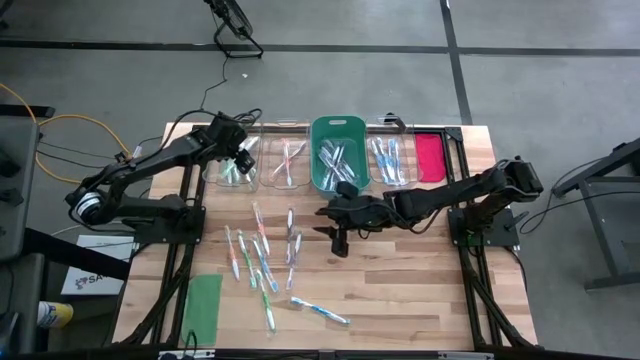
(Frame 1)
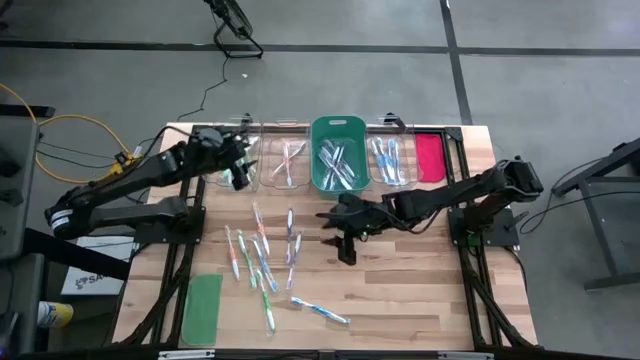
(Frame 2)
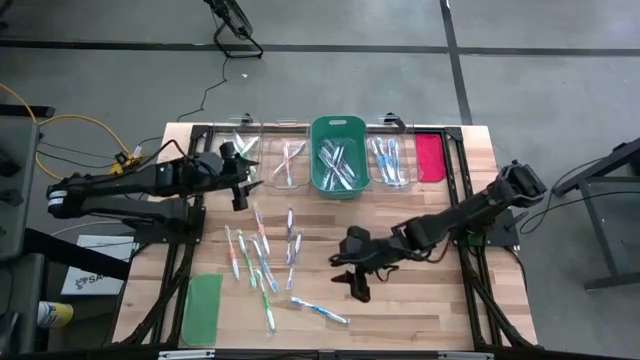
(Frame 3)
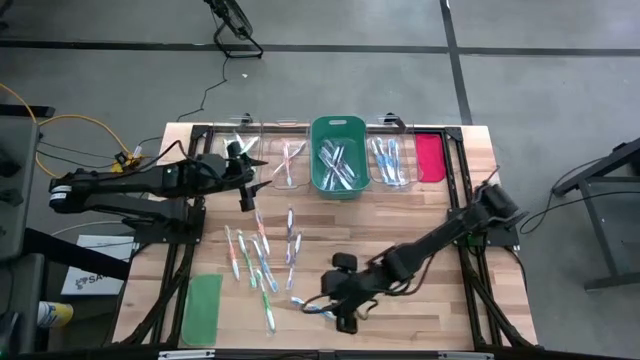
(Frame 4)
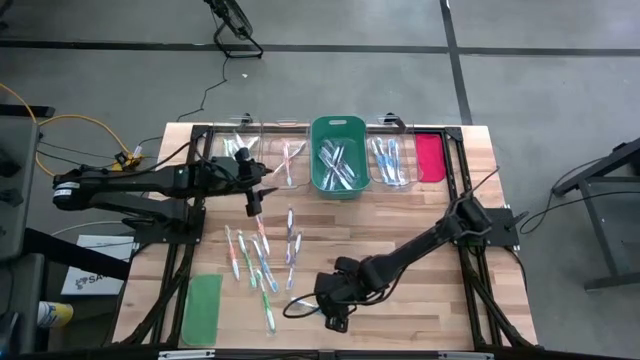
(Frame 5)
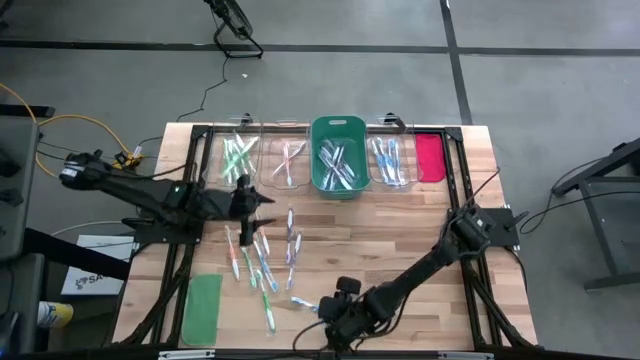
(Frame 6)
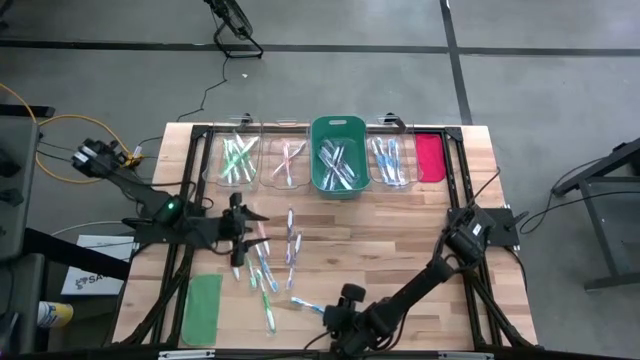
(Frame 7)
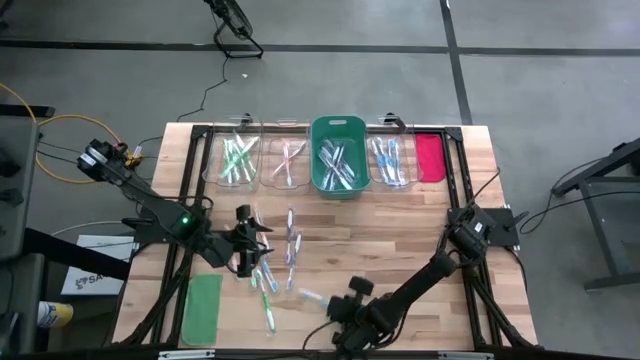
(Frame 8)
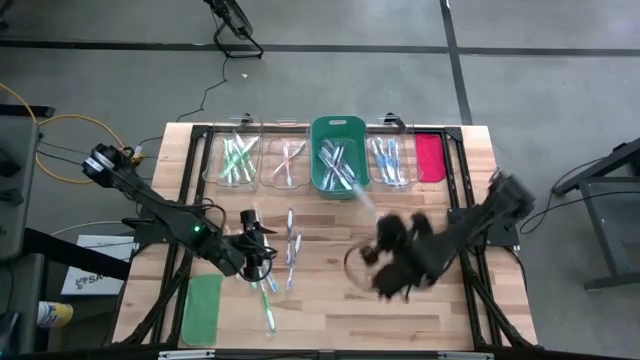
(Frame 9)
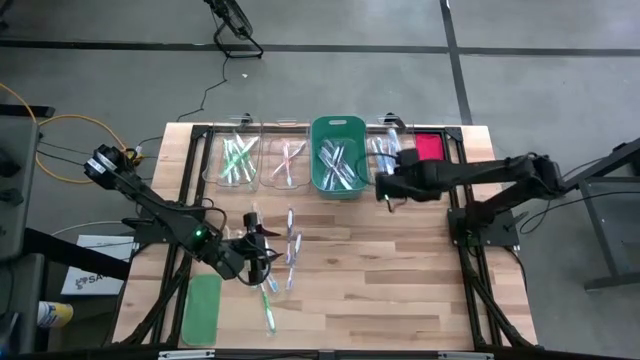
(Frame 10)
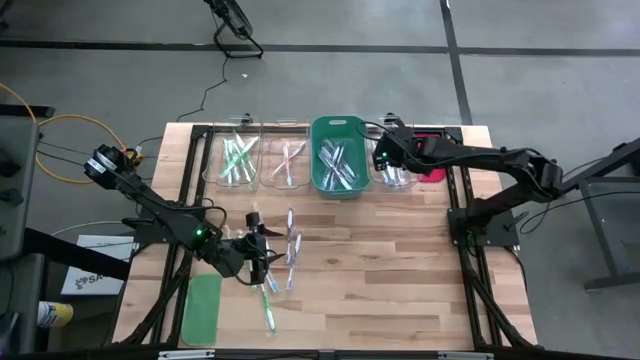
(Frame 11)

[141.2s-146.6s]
Task: Pick & Place Toothbrushes
Put the blue toothbrush into the right transparent bin

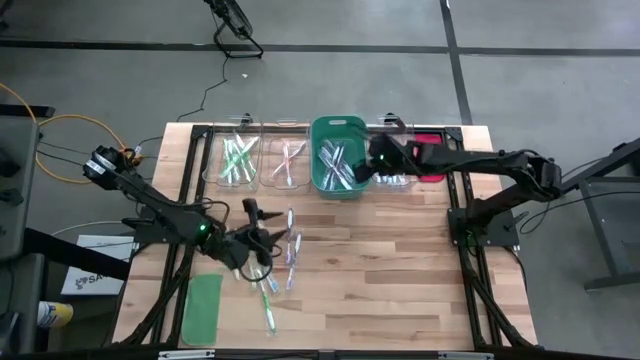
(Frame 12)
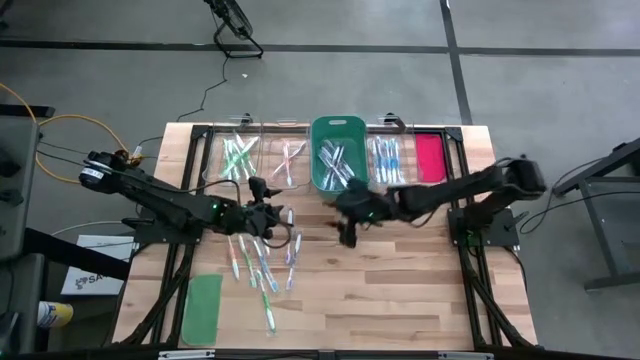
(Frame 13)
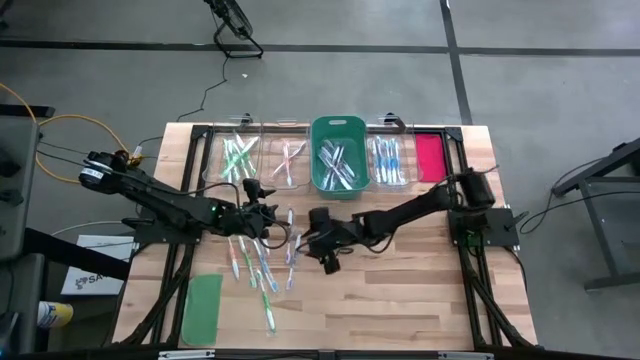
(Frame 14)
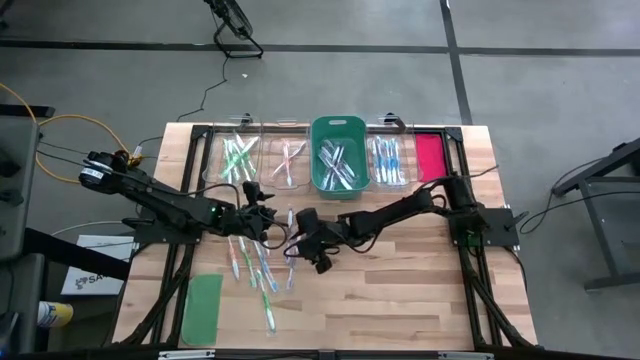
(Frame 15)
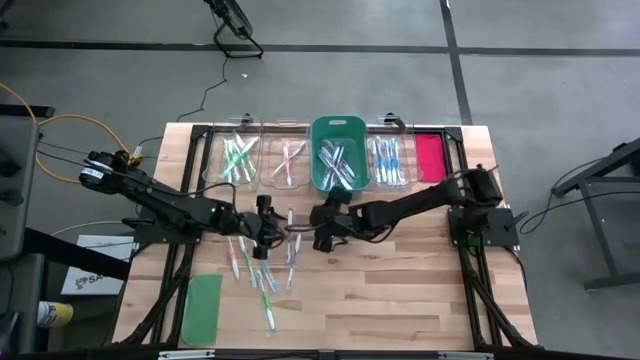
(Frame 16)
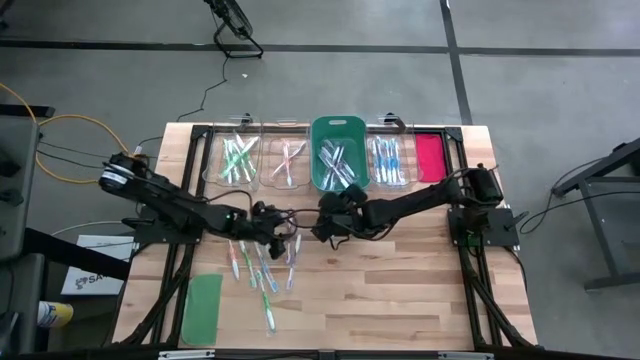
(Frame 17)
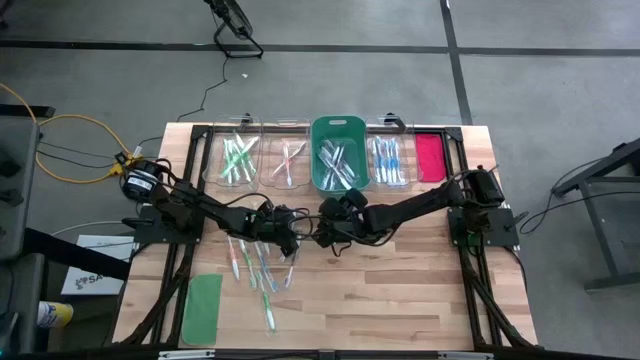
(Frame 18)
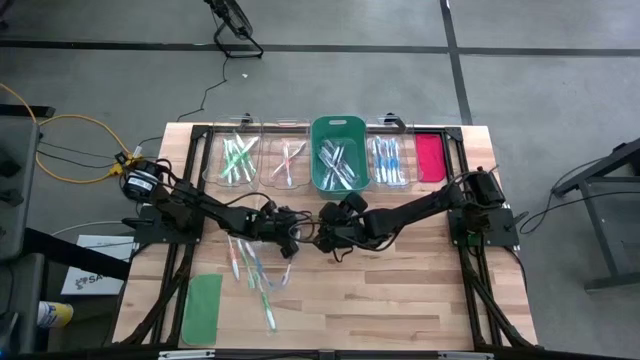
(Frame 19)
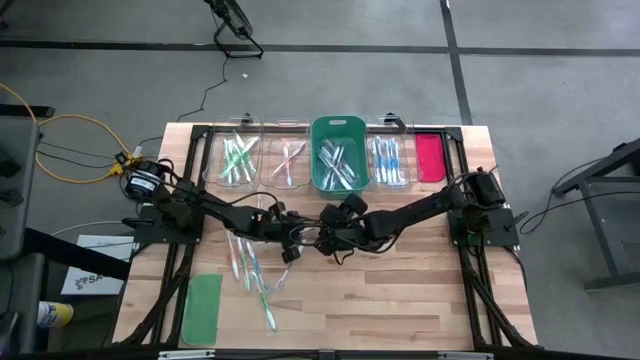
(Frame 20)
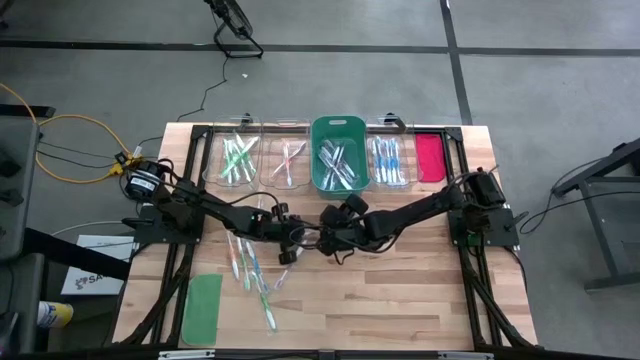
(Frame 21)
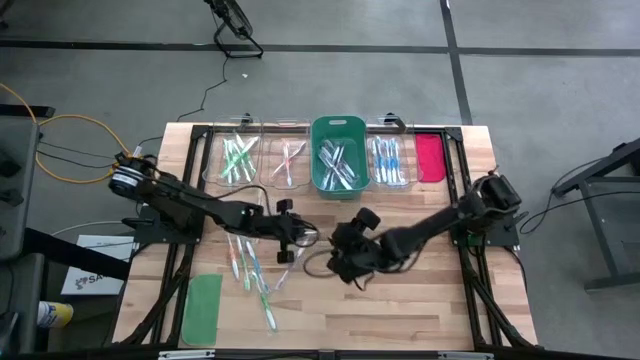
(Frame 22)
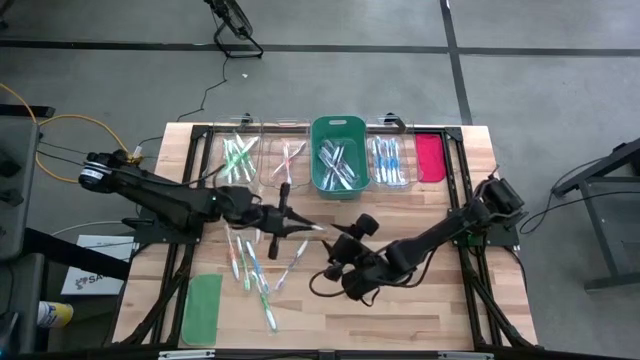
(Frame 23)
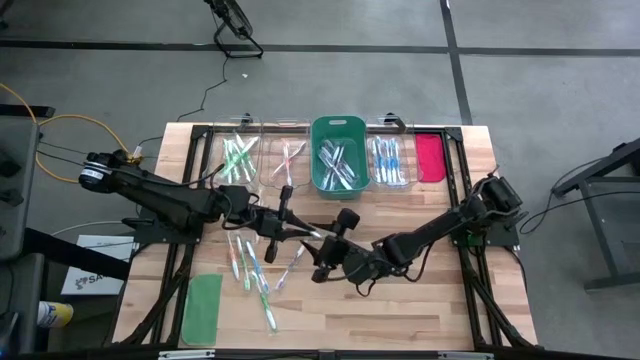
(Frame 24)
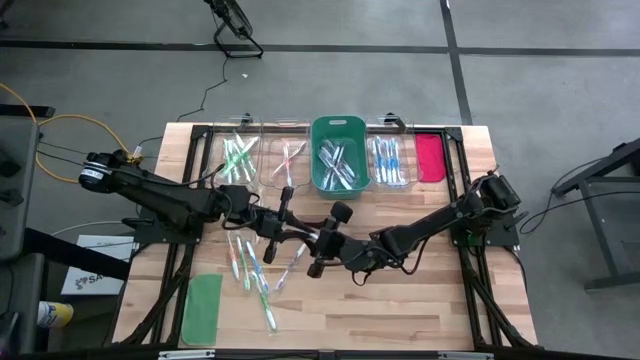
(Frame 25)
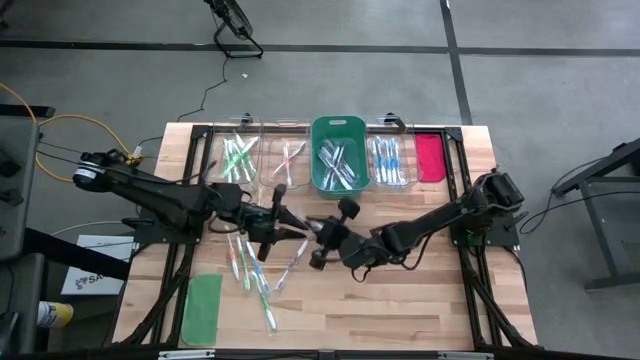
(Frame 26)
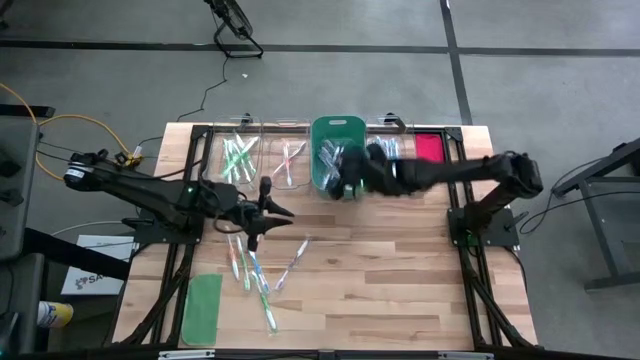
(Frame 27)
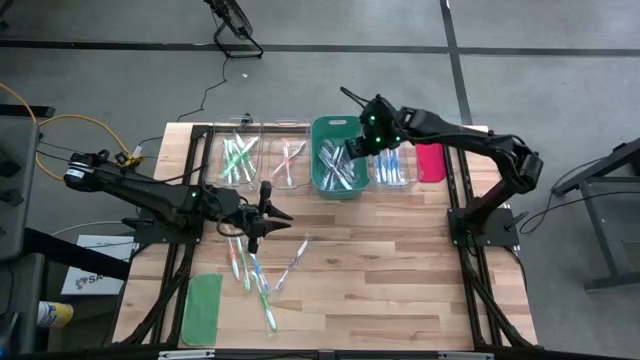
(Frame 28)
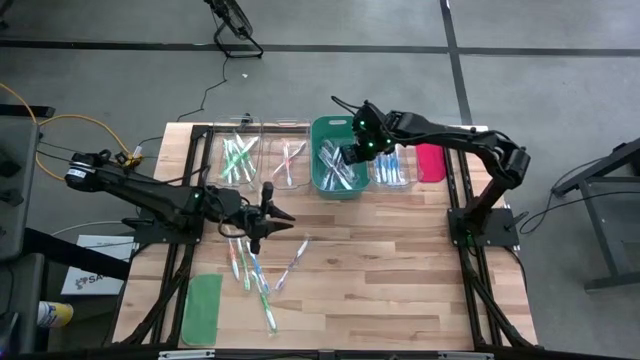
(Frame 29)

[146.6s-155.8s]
Put the purple toothbrush into the green bin

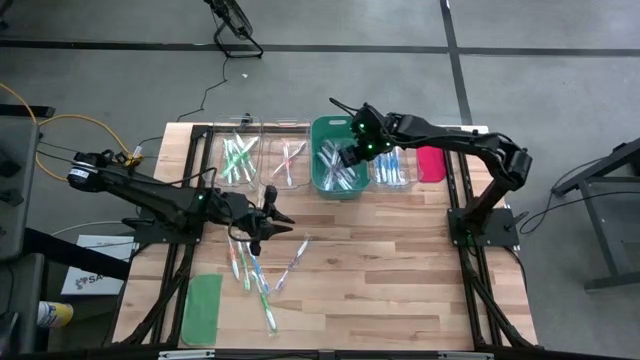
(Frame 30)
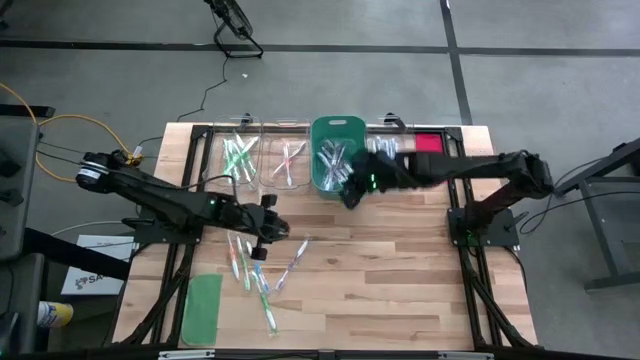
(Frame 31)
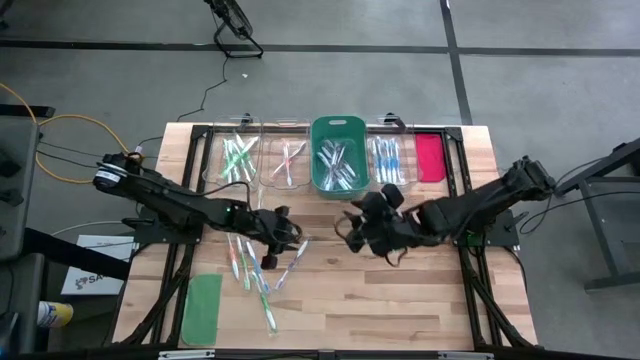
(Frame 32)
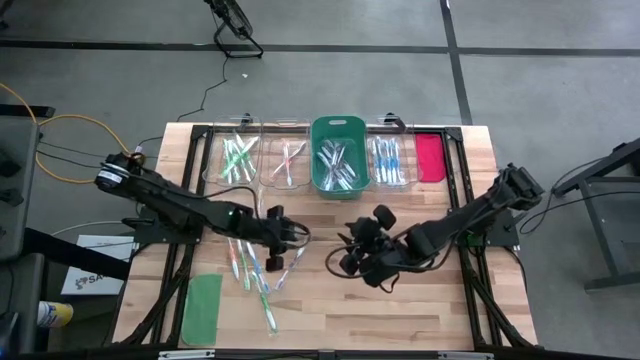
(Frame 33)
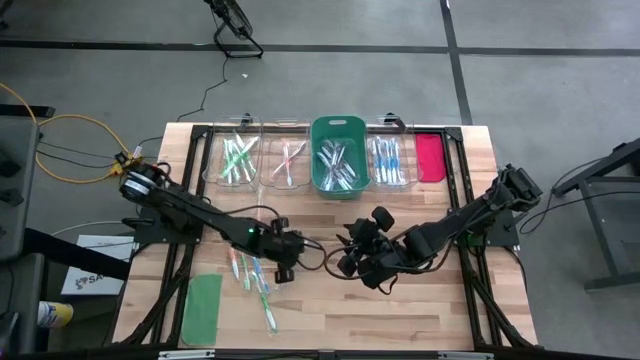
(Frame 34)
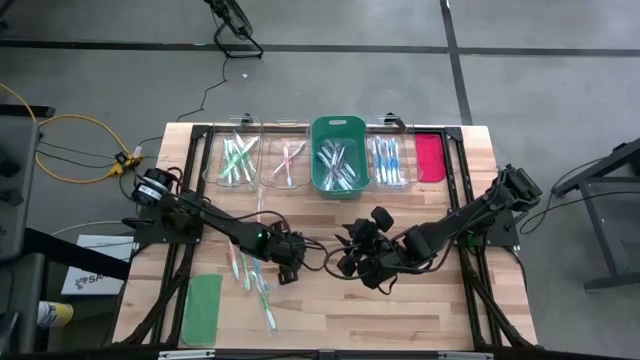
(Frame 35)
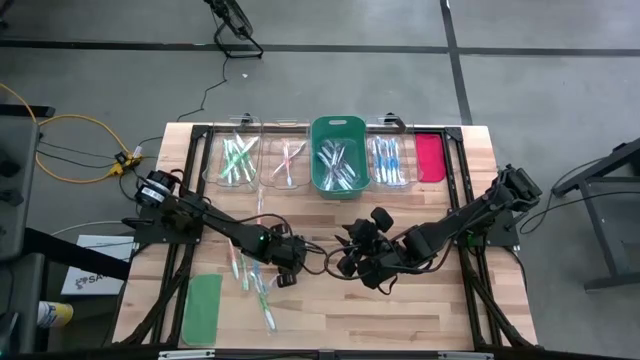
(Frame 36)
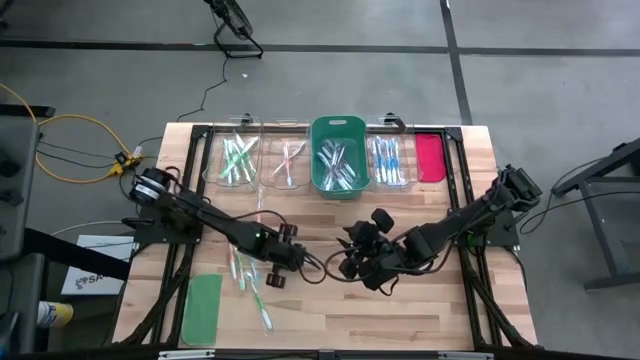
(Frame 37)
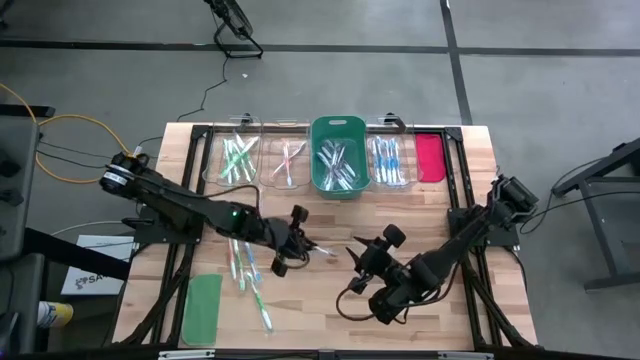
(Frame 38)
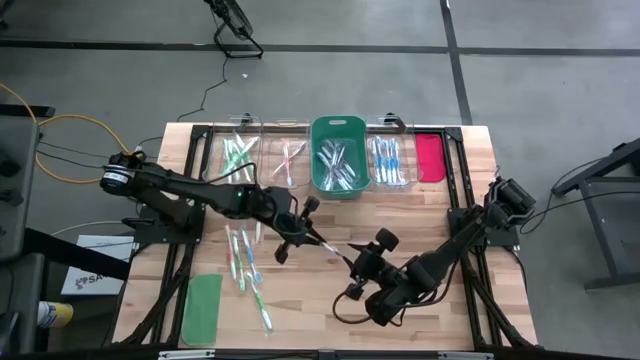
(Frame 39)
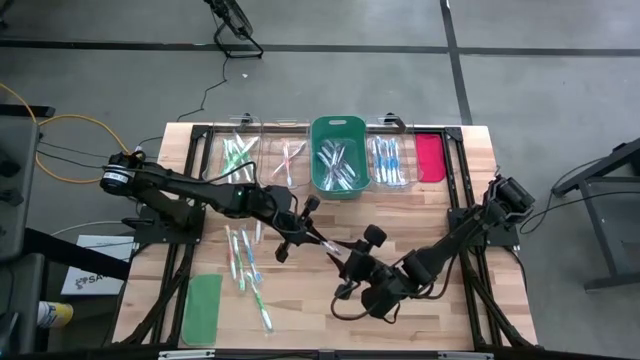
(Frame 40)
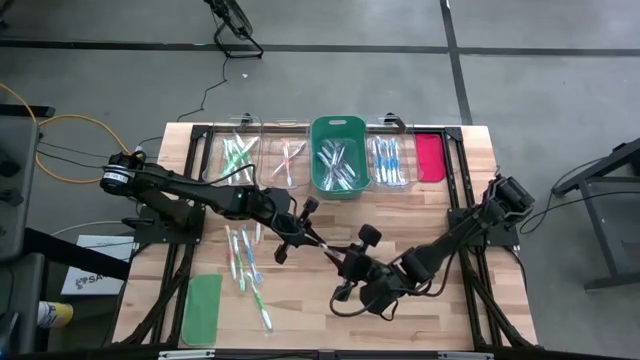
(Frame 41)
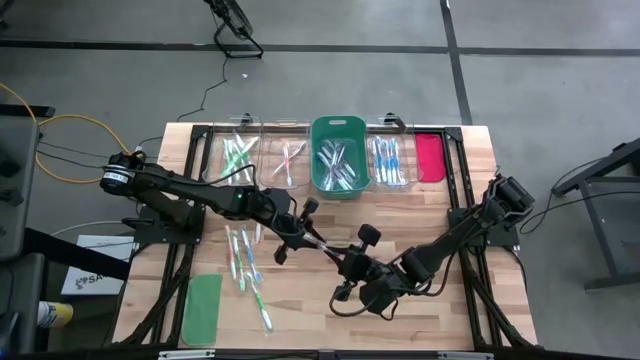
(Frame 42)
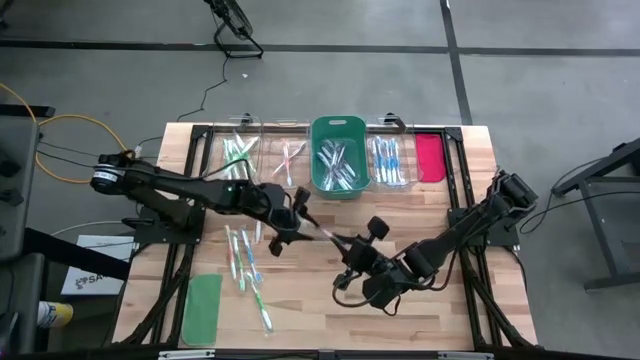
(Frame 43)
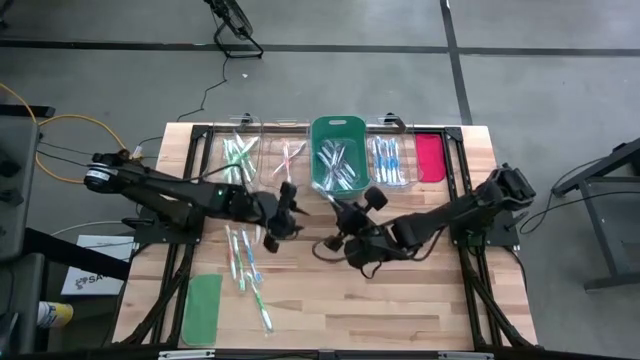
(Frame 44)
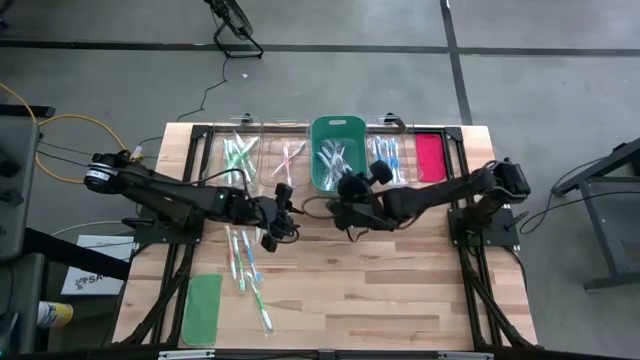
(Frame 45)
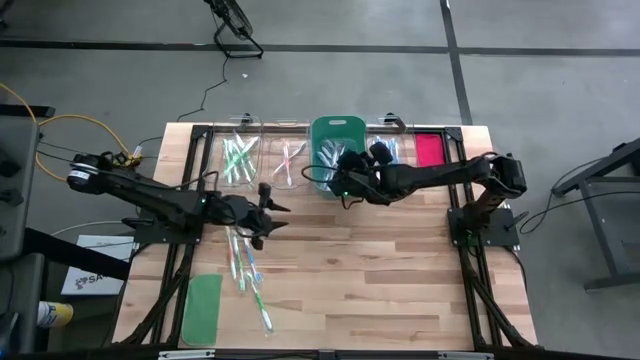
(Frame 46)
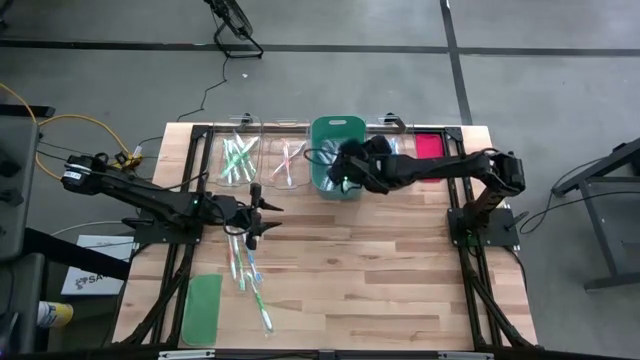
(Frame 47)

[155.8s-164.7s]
Put the purple toothbrush into the green bin
